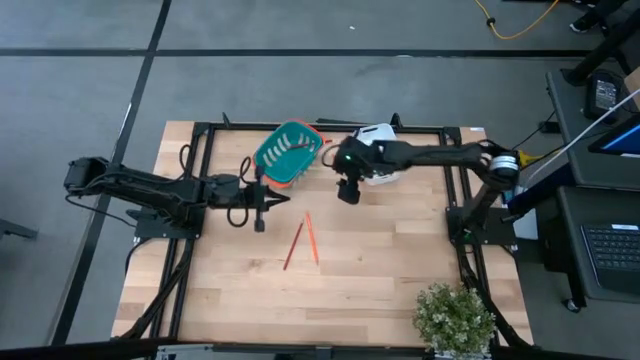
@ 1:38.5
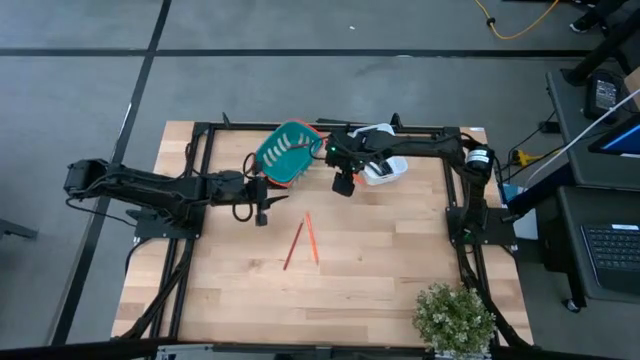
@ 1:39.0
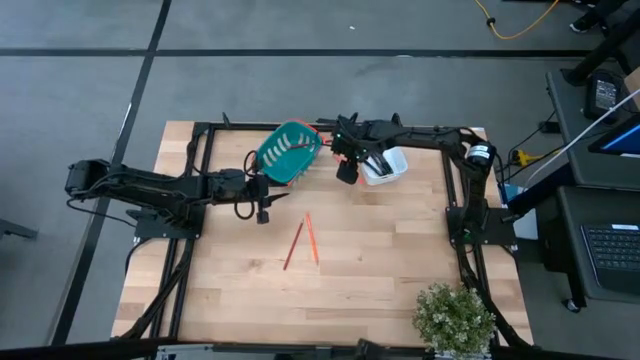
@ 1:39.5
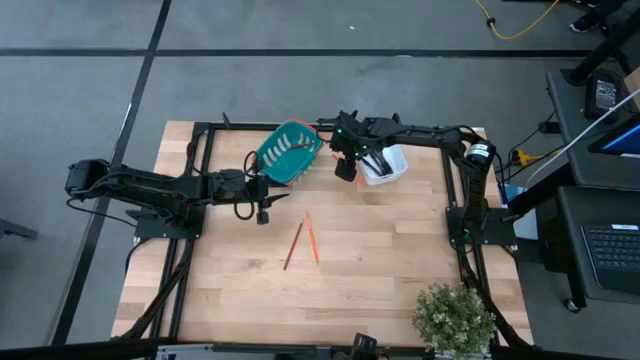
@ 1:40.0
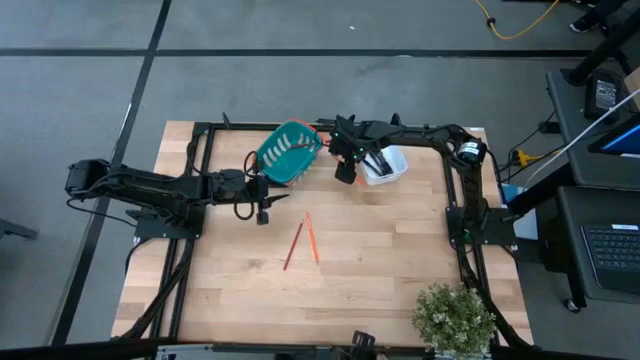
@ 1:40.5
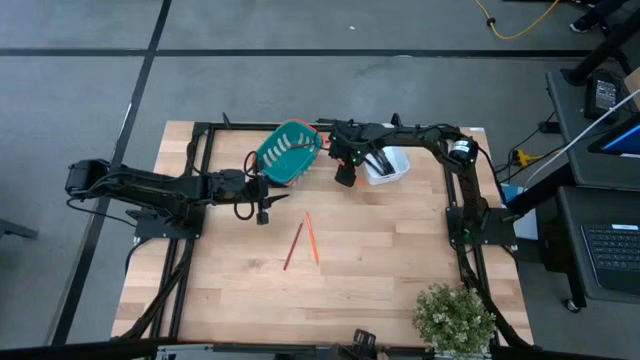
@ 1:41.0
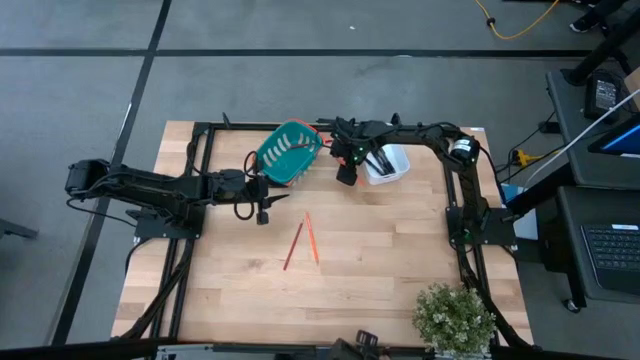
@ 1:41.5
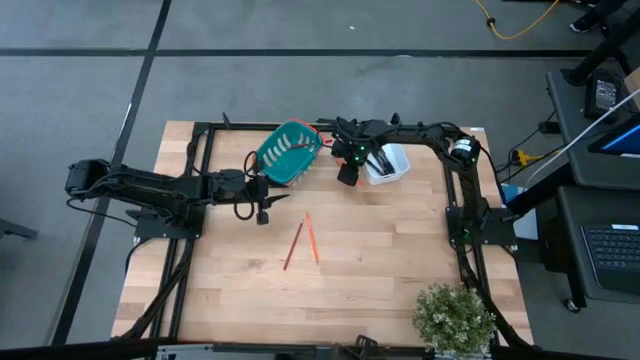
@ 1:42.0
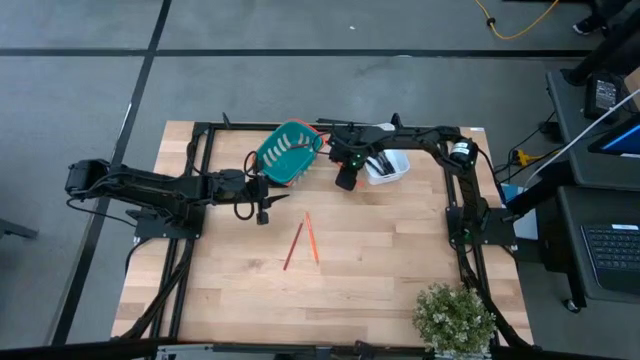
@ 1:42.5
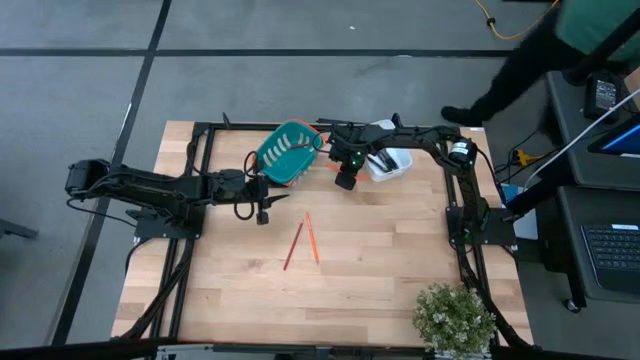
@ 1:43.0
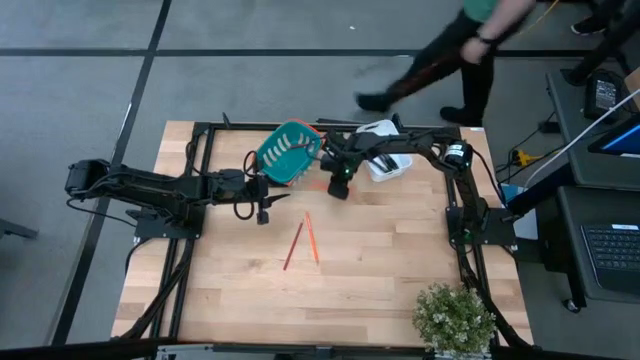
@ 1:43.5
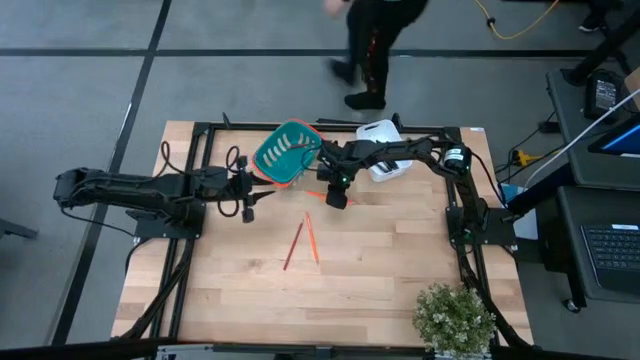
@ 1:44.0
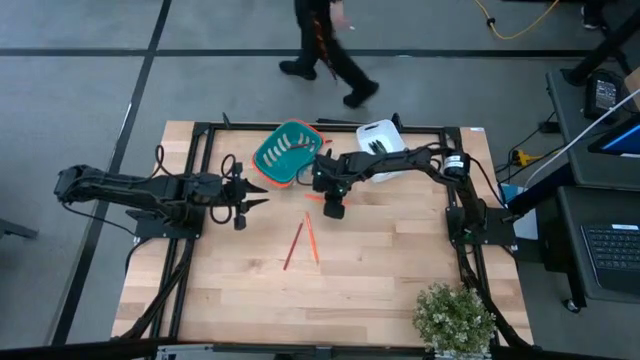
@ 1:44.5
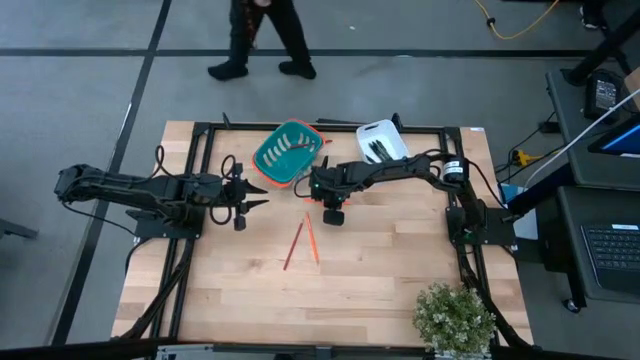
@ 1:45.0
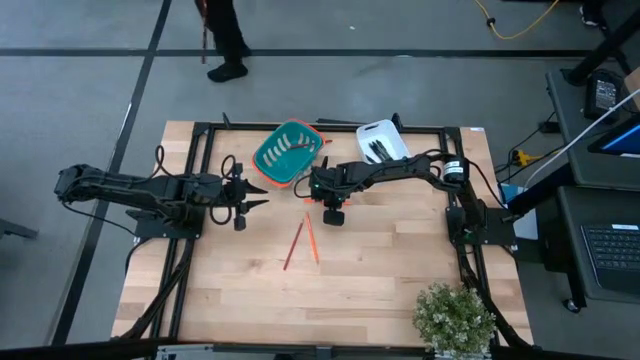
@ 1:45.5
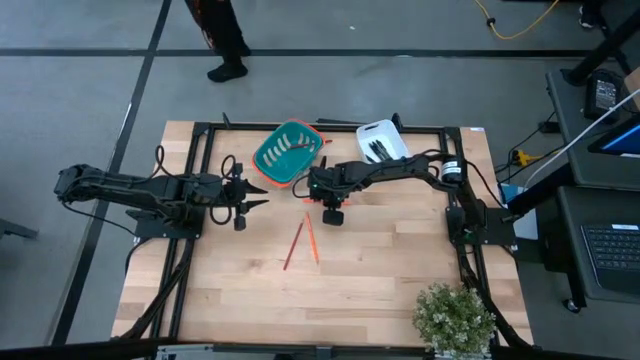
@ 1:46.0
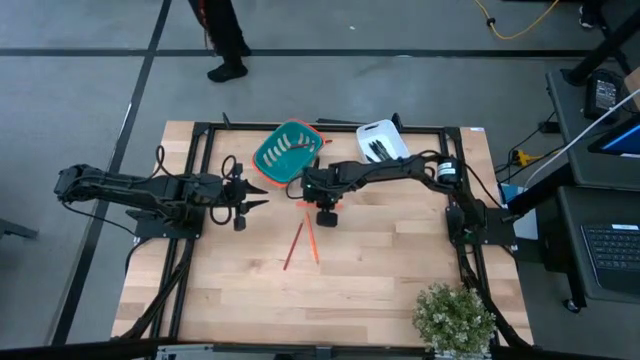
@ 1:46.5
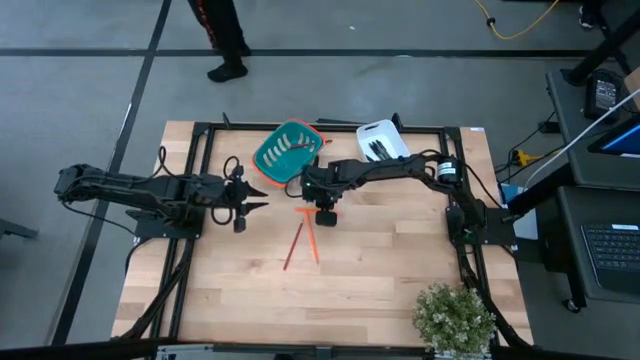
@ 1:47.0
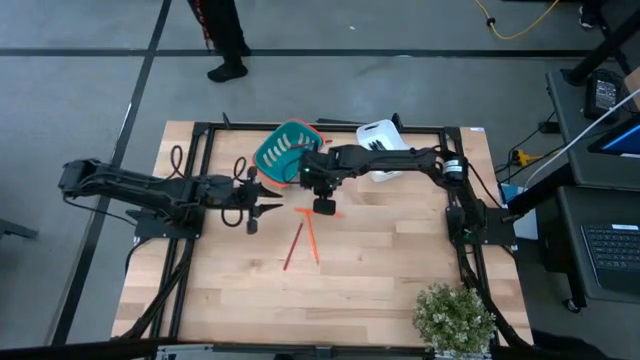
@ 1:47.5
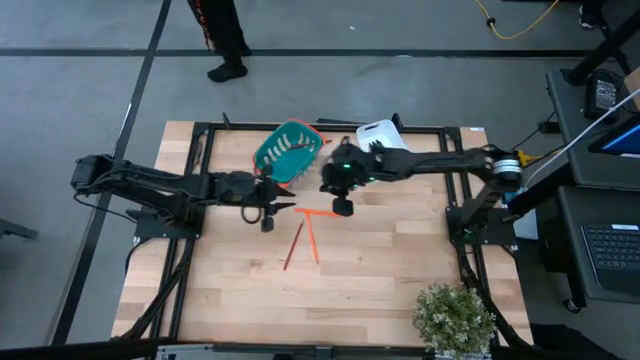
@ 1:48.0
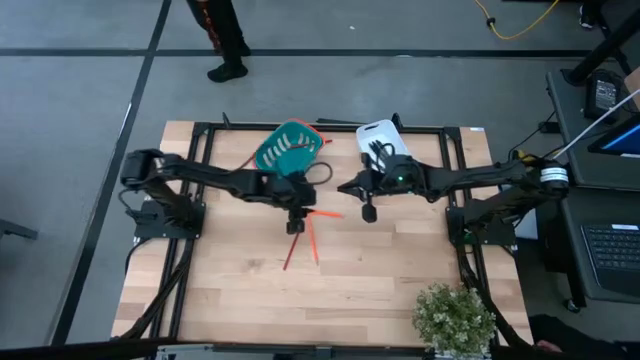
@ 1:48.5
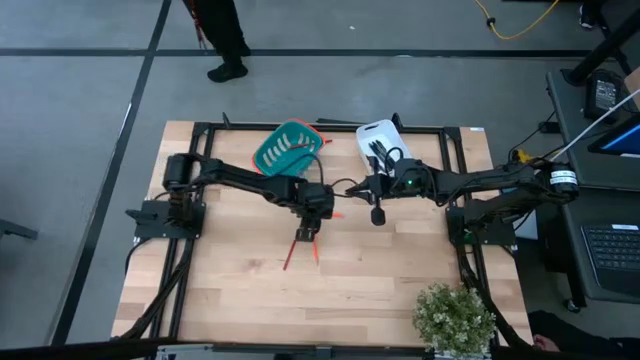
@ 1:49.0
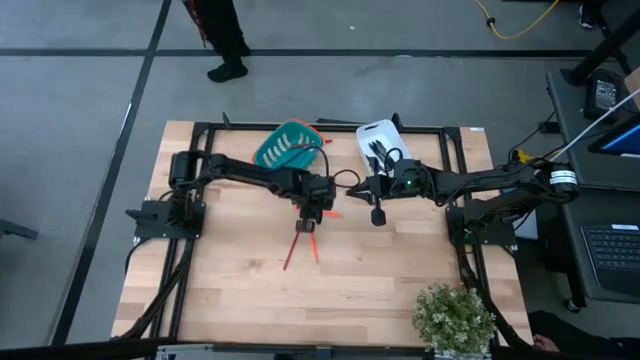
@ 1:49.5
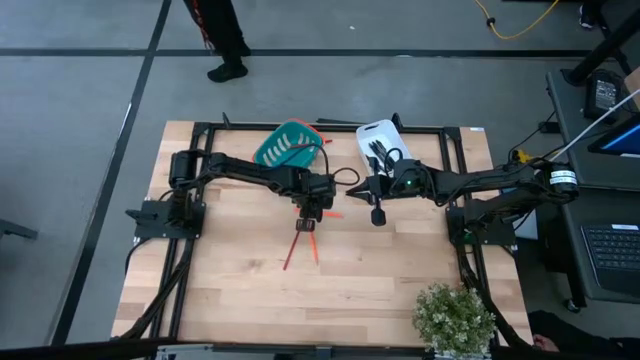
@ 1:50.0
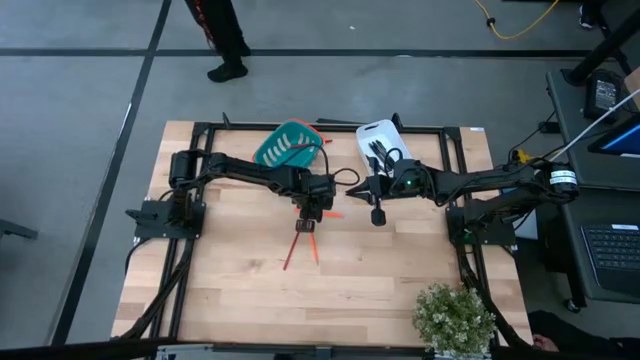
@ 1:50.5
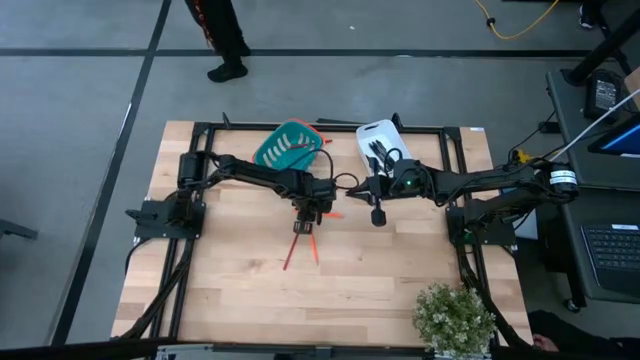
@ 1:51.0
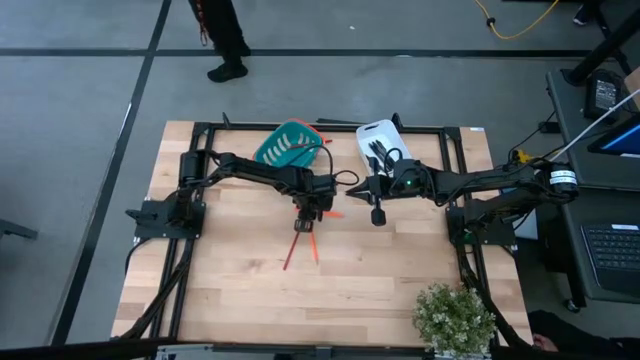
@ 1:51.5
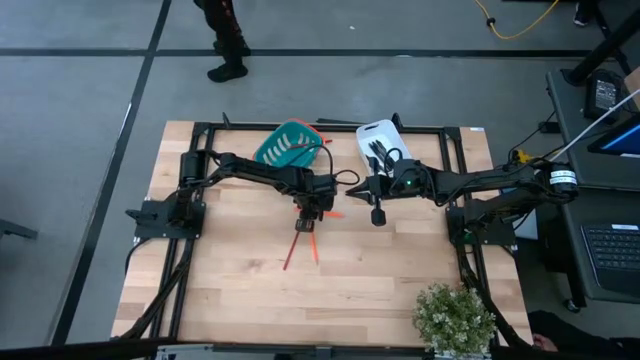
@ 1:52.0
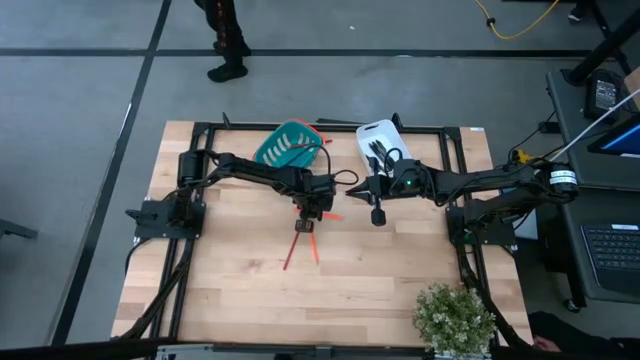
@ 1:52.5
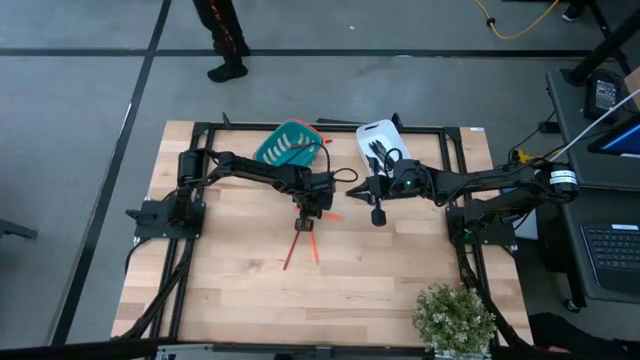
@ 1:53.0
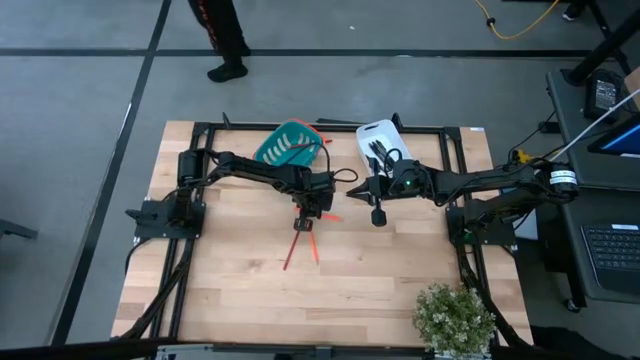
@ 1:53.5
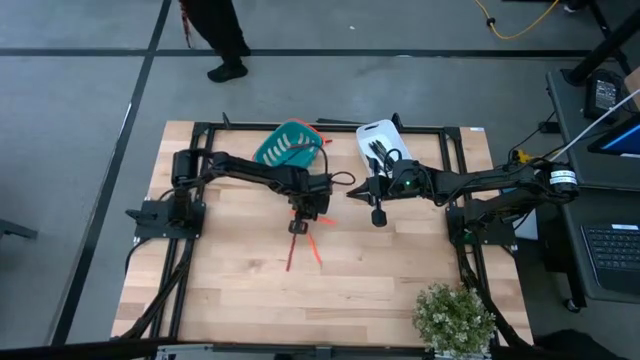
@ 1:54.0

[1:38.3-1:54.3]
Task: Sort pens & pencils
Put the orange pencil into the blue bin

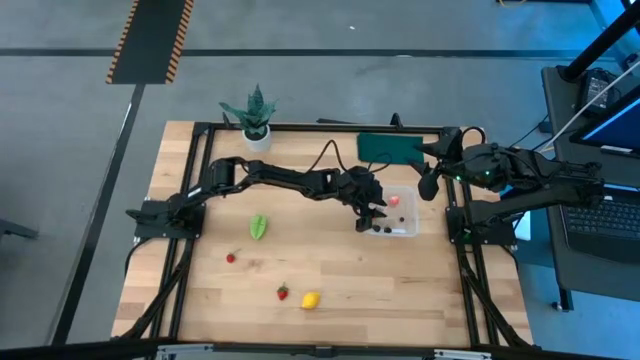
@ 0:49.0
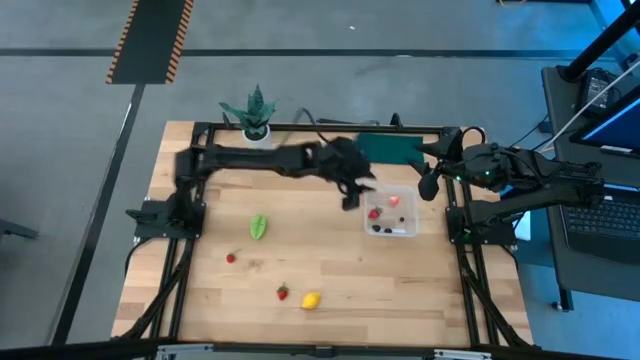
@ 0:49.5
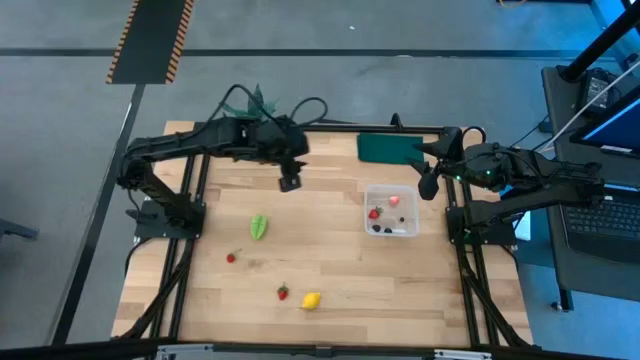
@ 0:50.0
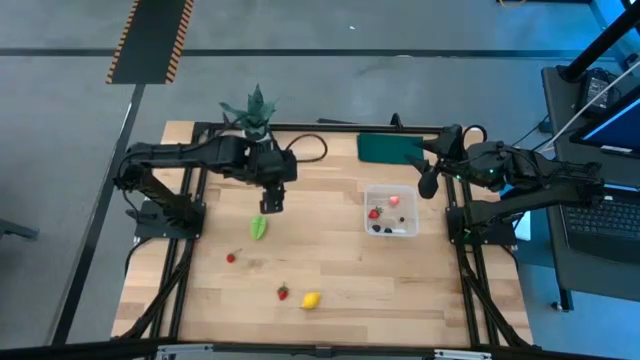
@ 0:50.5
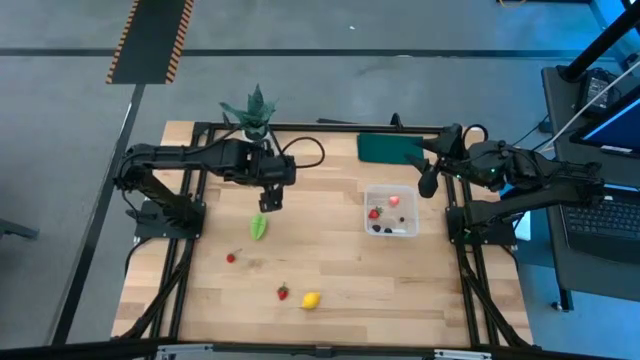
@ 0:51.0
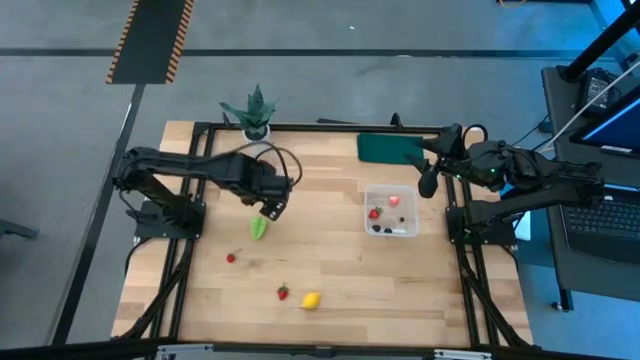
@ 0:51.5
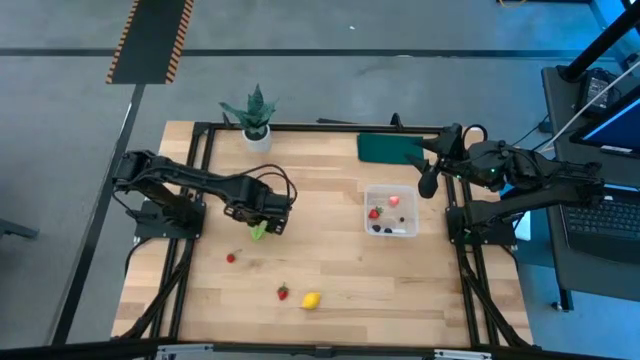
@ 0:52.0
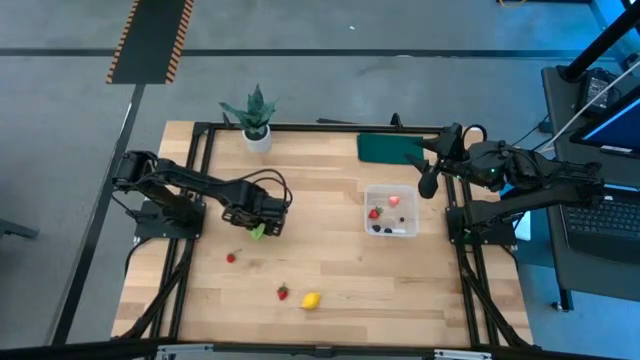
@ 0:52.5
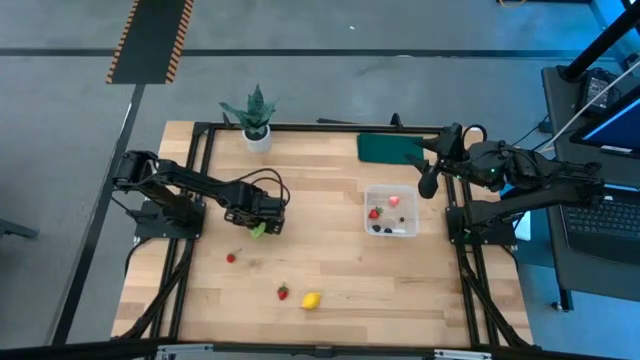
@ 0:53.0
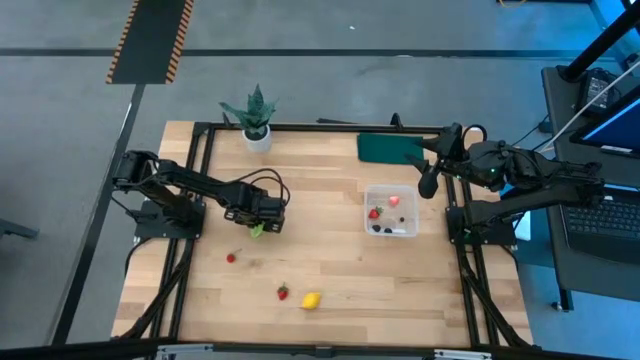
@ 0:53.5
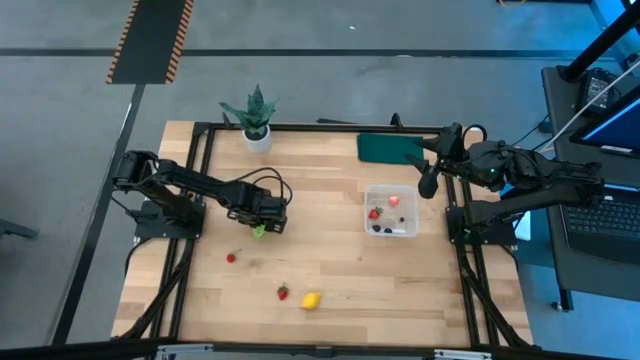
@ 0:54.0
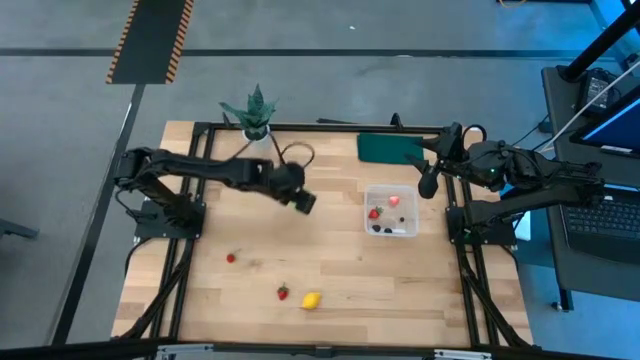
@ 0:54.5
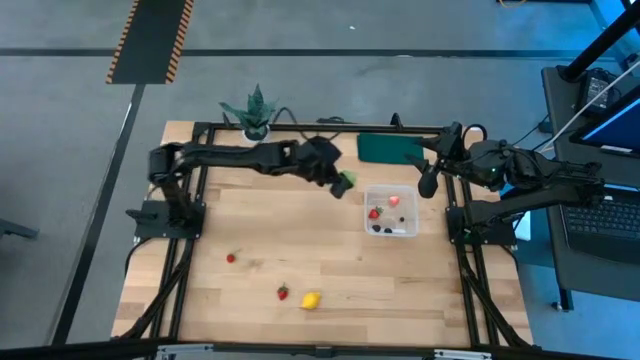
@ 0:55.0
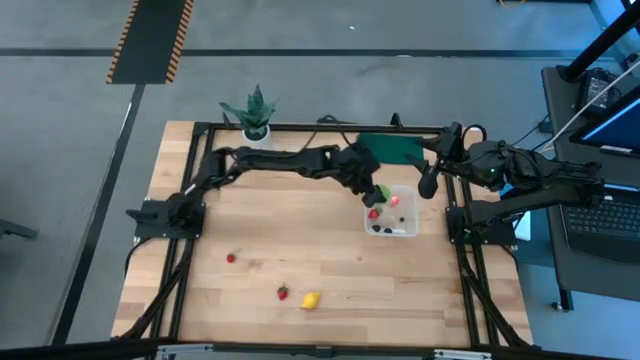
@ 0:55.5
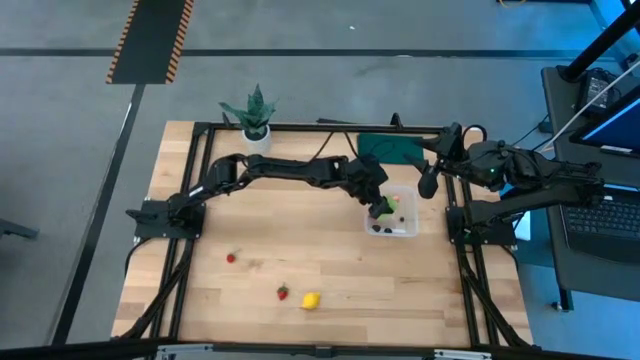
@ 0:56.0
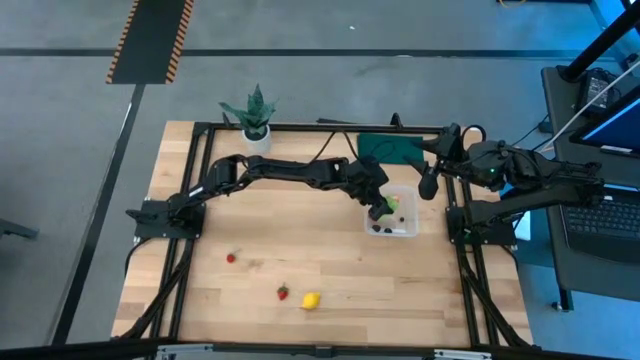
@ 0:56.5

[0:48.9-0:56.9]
Task: Pick and placing Produce into tupperware
Put the green starfruit into the transparent container
